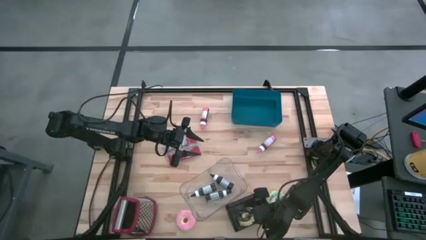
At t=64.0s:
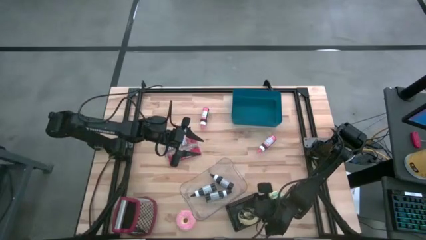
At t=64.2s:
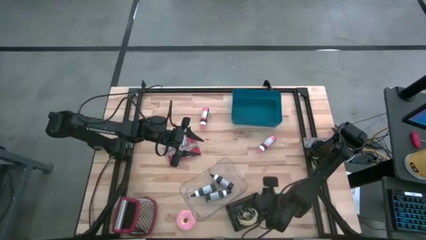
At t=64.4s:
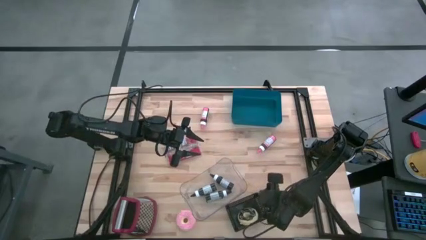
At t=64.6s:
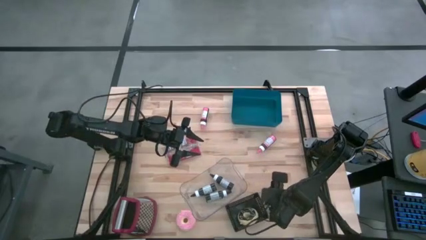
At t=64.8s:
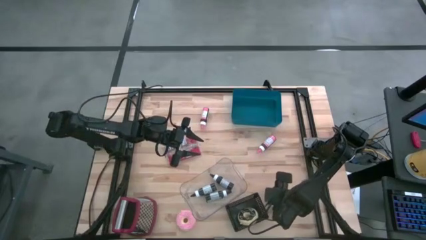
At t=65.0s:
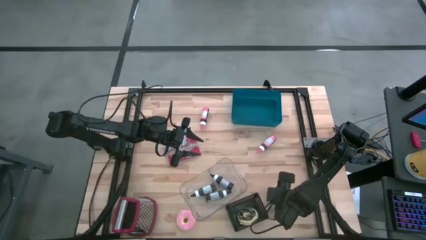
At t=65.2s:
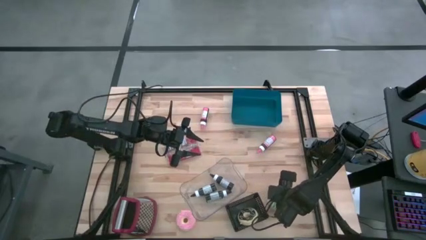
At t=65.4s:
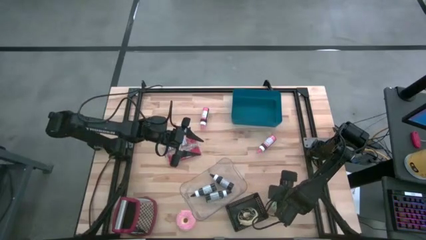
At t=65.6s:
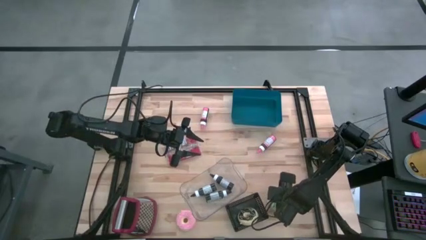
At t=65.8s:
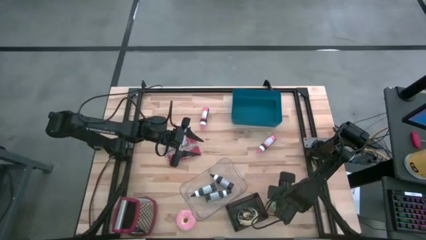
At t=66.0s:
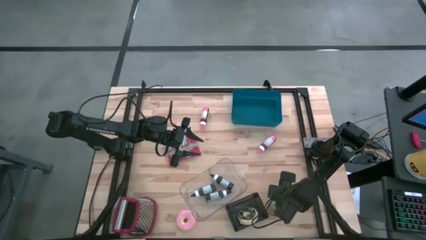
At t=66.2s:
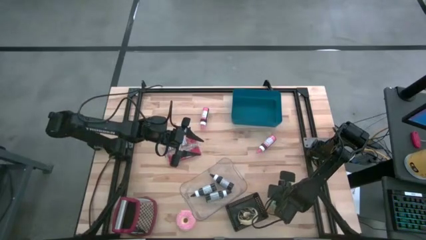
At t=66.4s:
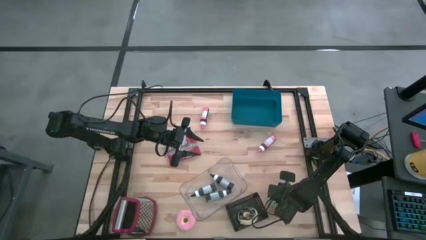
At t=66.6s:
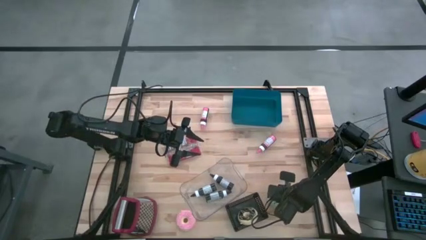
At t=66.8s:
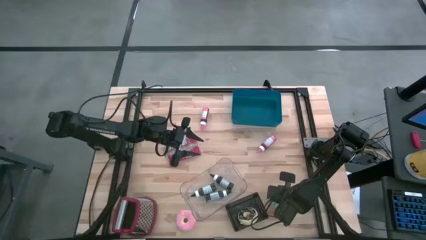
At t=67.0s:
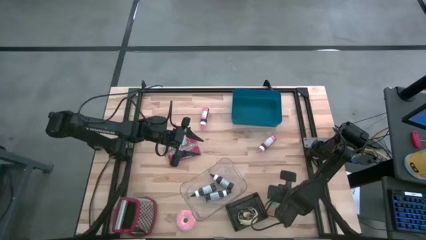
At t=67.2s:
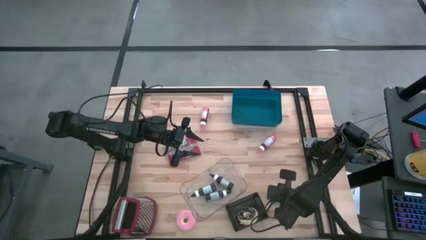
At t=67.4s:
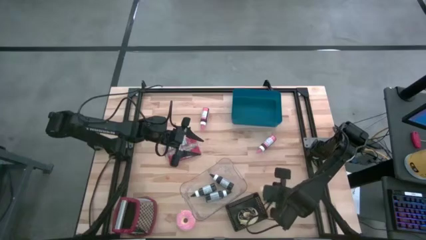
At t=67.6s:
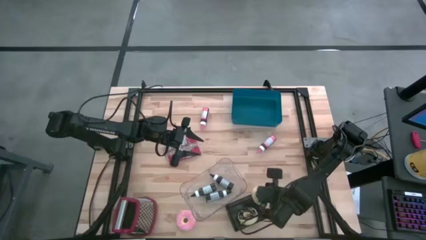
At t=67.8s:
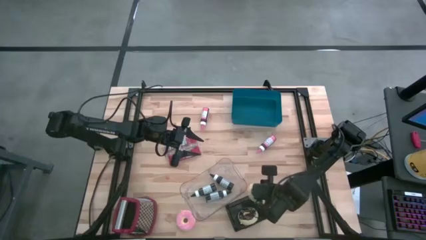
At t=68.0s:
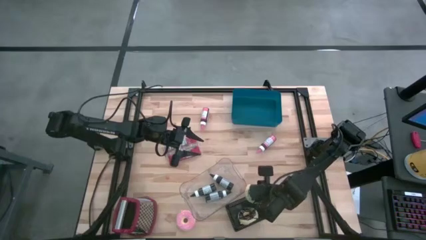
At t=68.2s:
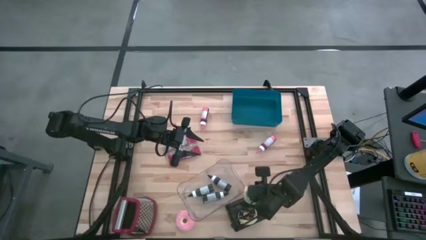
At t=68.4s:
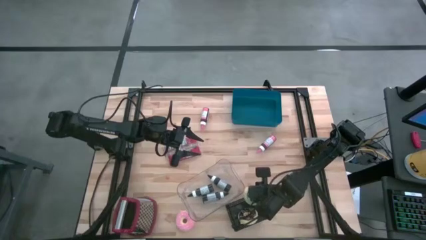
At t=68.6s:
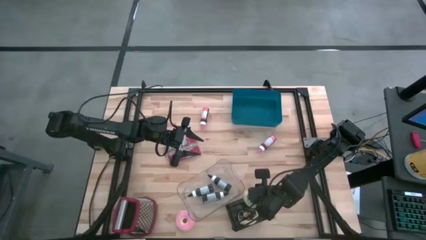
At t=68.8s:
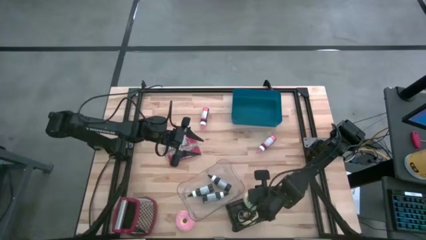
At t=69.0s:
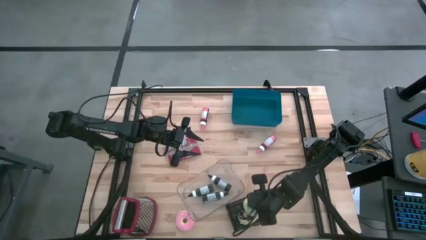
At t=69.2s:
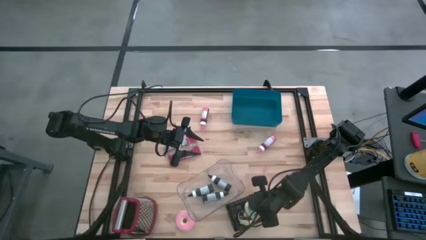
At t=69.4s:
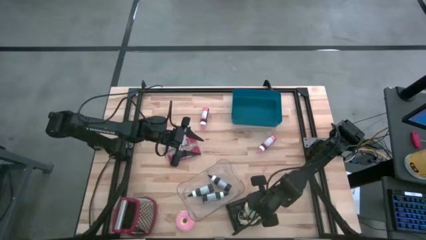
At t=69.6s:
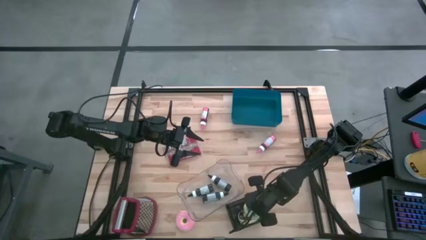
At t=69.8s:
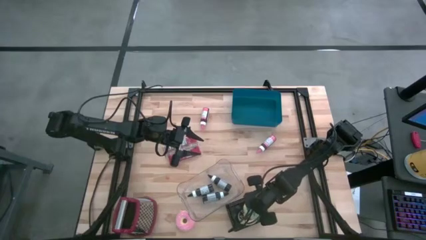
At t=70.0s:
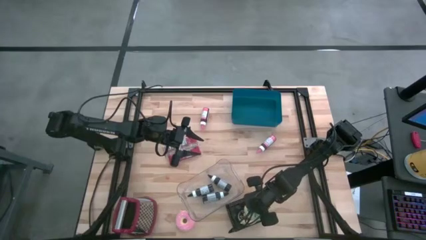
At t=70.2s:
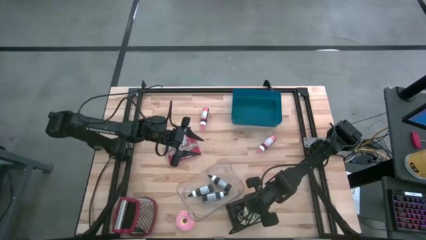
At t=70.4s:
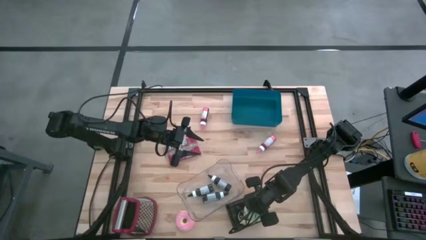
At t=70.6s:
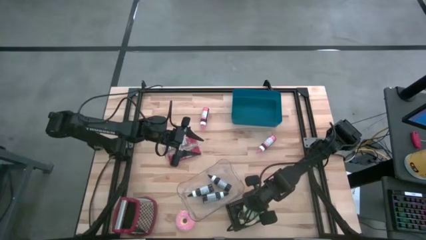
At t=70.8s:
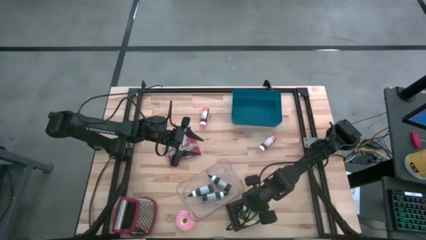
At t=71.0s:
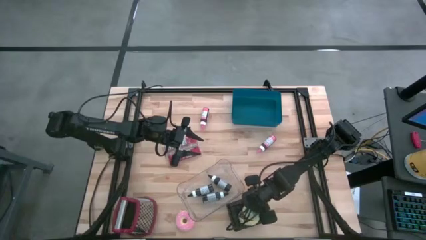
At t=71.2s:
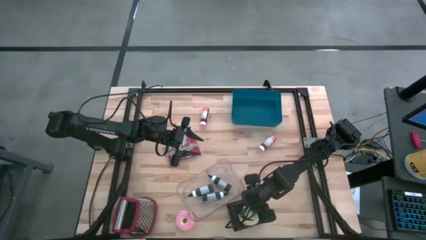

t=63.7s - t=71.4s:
Put the blue donut into the black basket

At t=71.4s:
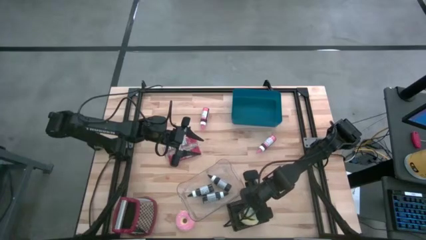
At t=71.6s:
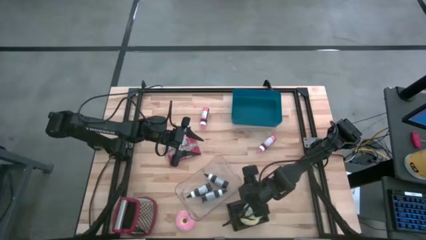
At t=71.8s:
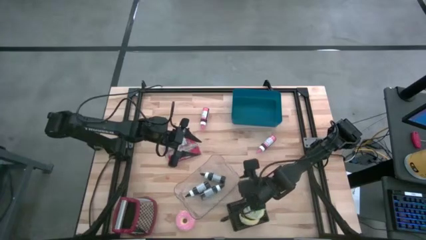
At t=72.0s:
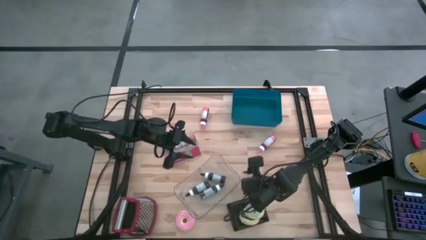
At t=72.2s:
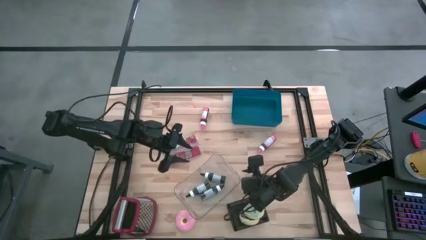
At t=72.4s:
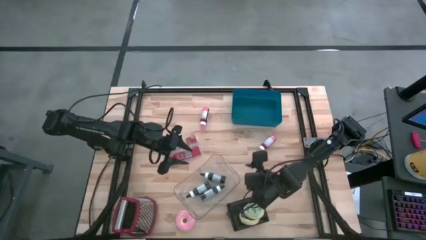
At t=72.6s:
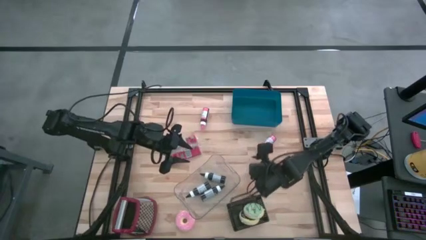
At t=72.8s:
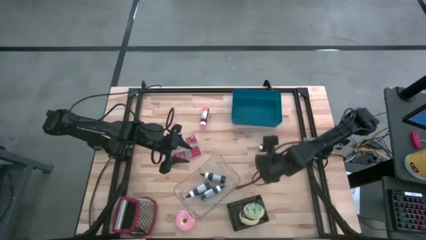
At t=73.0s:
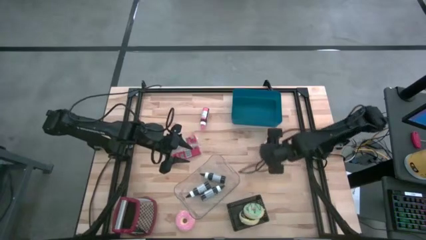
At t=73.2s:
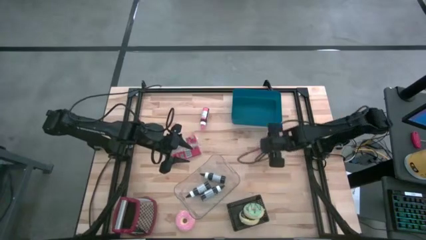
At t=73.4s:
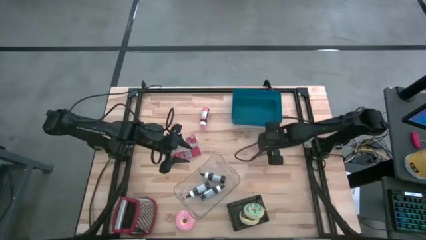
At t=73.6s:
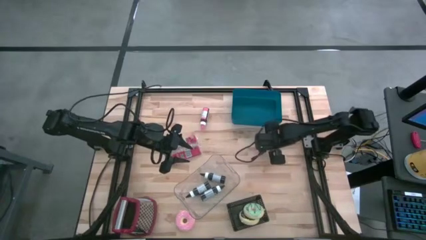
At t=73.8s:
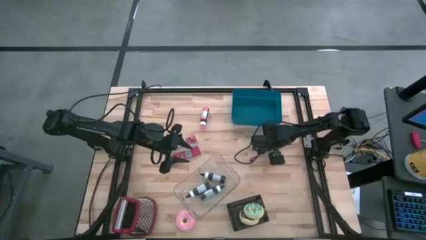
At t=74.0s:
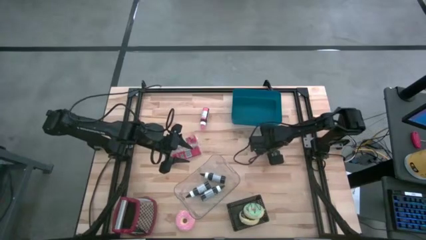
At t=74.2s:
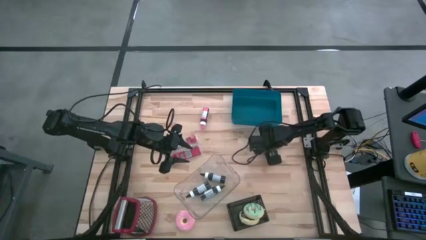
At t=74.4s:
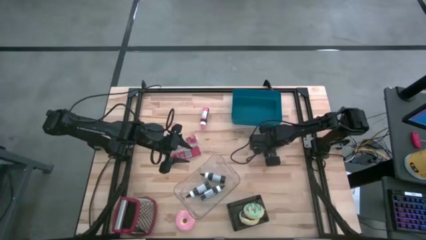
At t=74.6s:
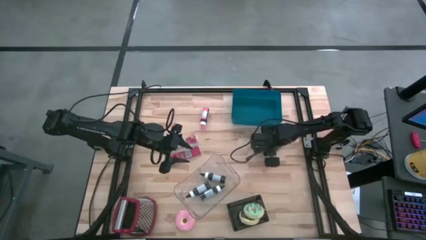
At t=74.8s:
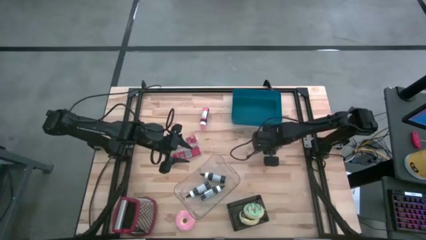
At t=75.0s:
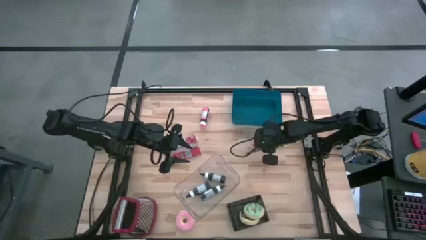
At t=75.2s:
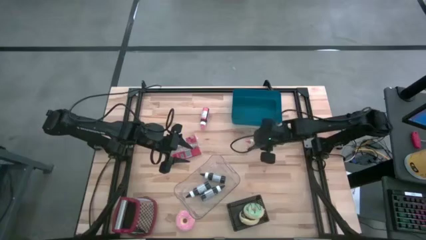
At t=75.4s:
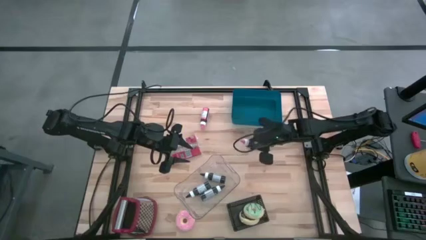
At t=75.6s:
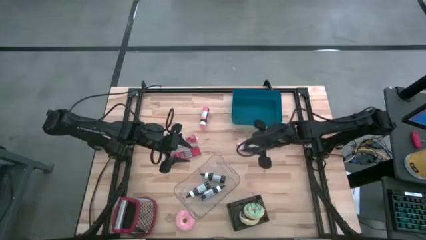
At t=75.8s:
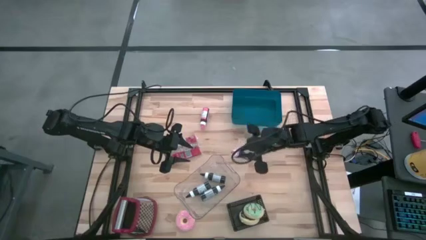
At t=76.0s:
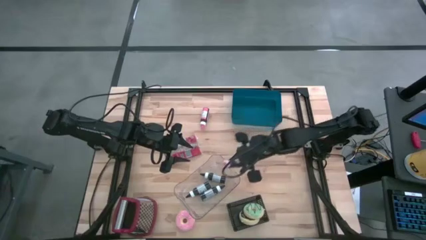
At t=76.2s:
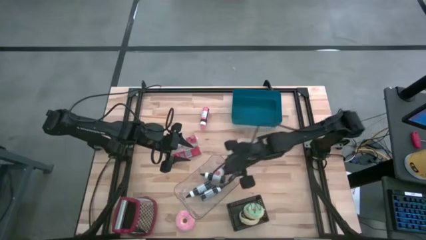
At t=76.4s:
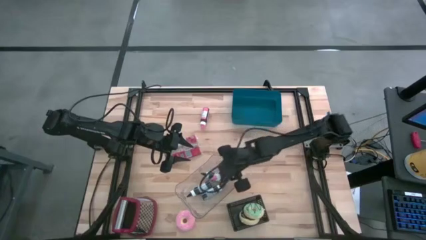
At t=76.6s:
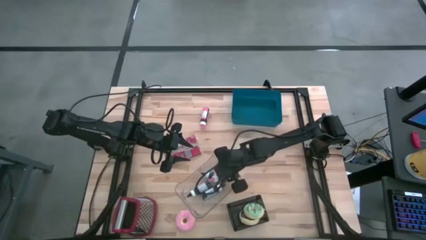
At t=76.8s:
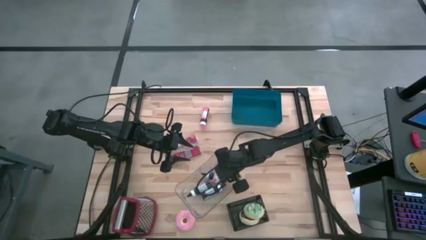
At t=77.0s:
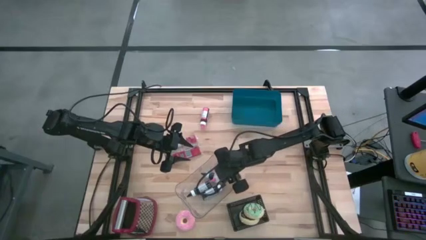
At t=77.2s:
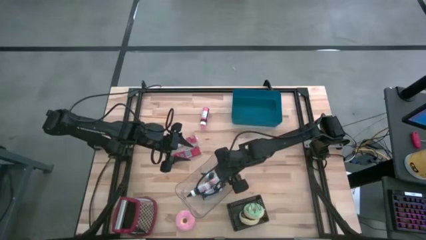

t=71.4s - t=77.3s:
Put the right pink food coloring bottle into the transparent bin
